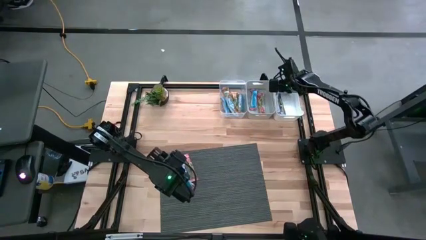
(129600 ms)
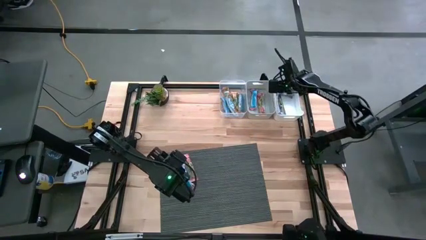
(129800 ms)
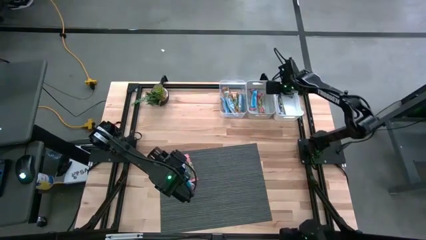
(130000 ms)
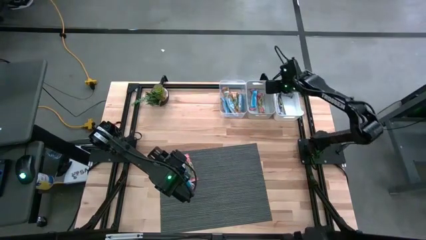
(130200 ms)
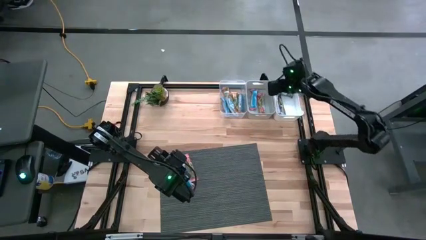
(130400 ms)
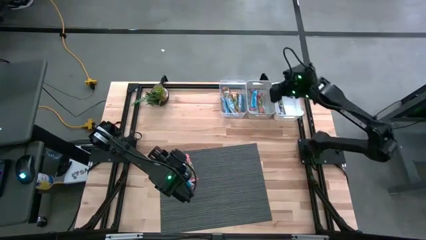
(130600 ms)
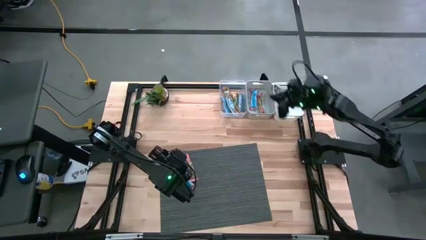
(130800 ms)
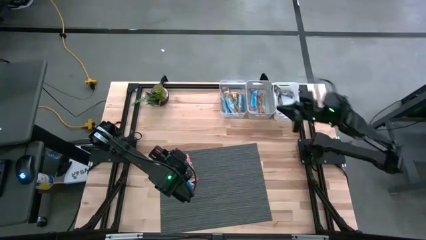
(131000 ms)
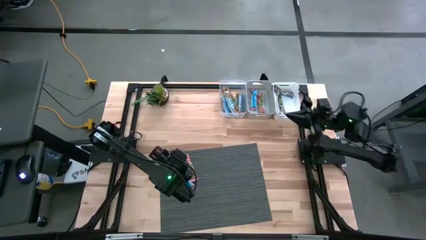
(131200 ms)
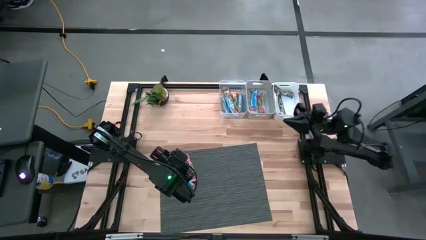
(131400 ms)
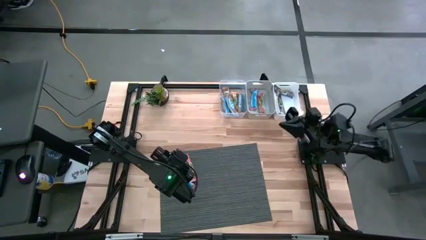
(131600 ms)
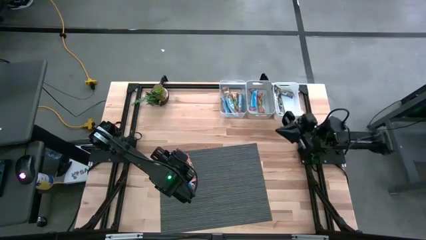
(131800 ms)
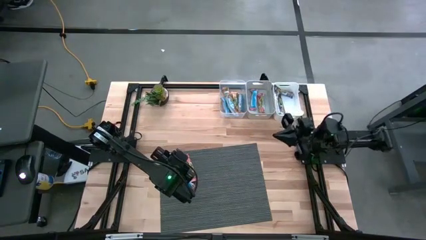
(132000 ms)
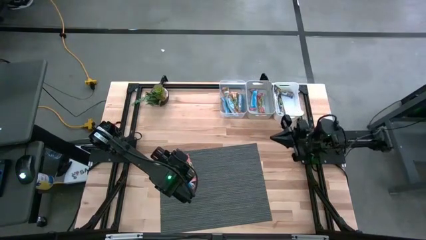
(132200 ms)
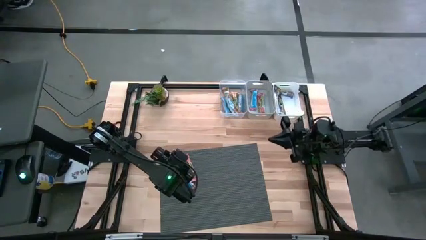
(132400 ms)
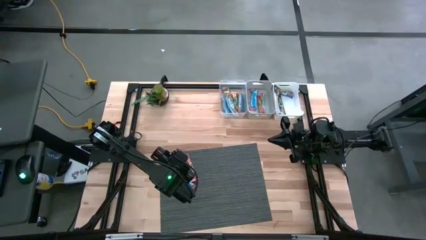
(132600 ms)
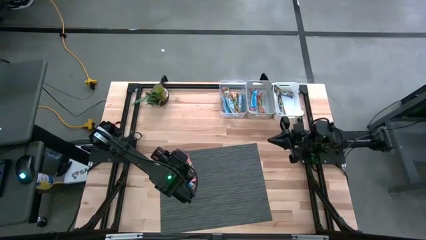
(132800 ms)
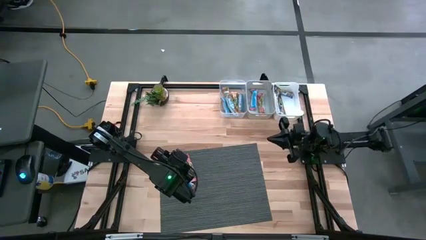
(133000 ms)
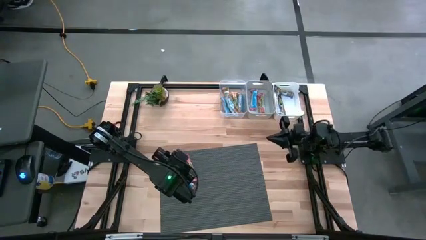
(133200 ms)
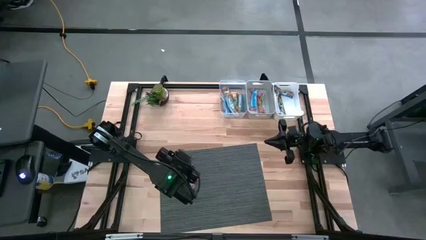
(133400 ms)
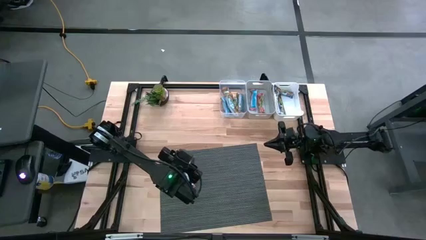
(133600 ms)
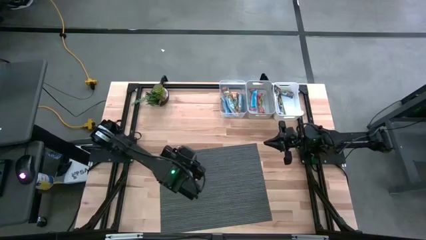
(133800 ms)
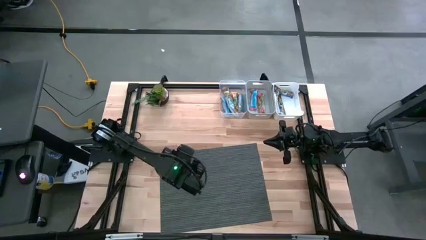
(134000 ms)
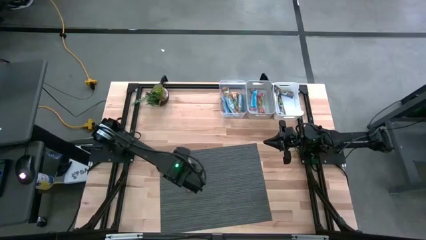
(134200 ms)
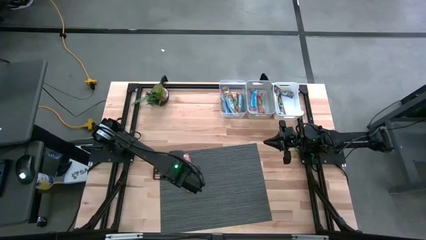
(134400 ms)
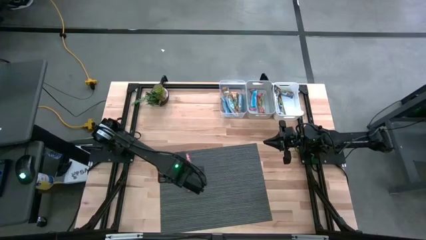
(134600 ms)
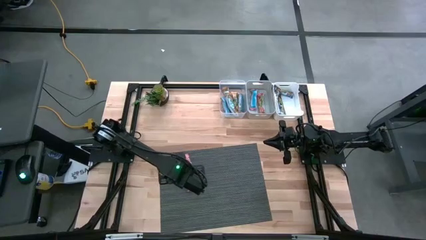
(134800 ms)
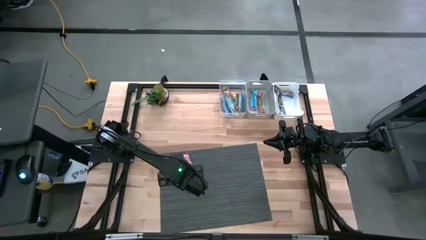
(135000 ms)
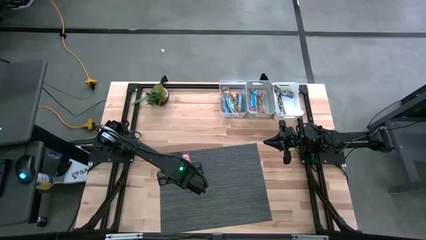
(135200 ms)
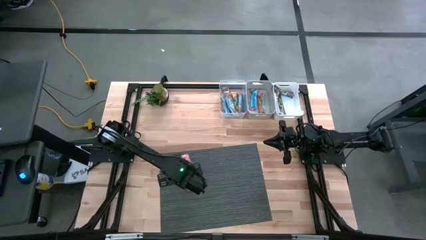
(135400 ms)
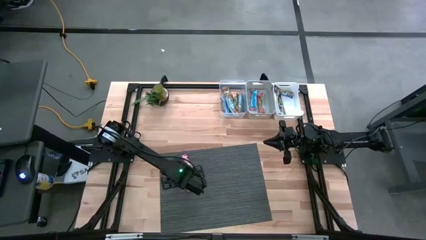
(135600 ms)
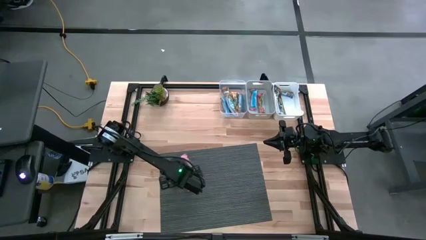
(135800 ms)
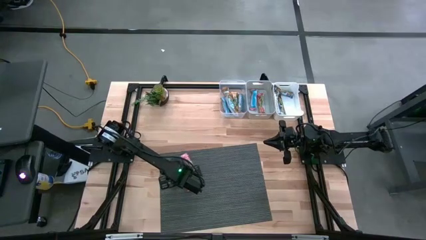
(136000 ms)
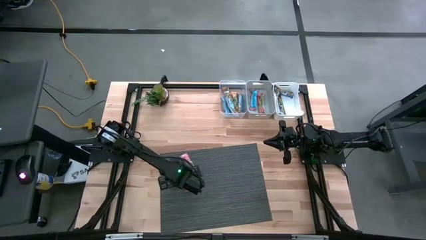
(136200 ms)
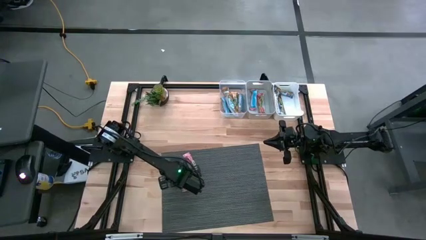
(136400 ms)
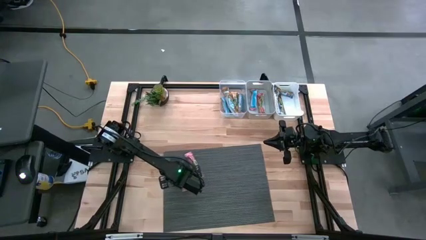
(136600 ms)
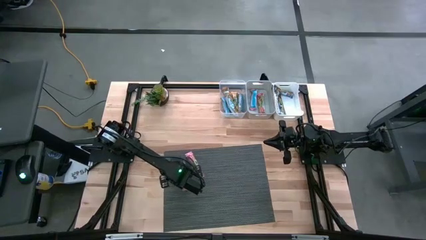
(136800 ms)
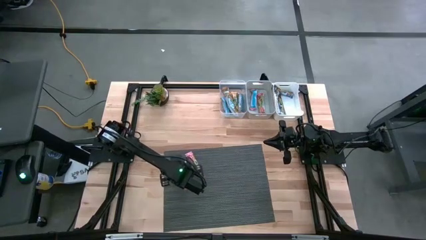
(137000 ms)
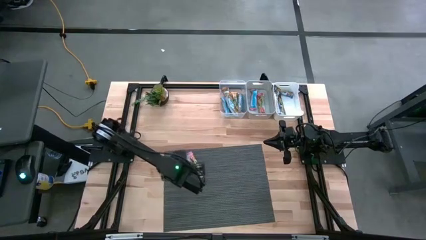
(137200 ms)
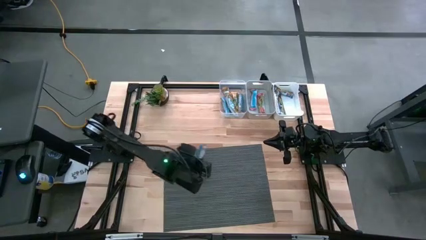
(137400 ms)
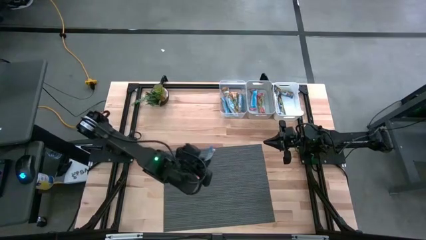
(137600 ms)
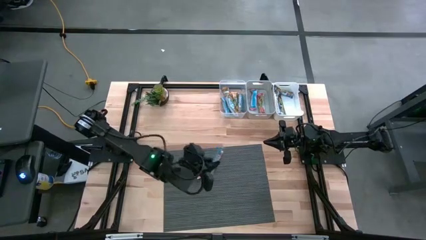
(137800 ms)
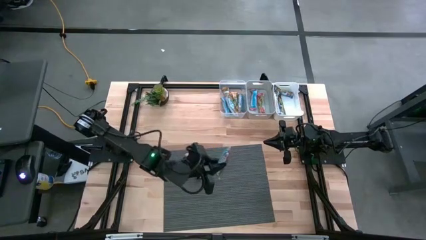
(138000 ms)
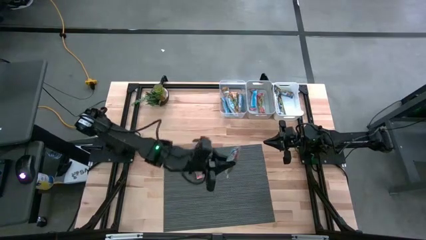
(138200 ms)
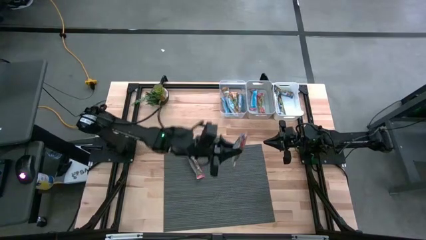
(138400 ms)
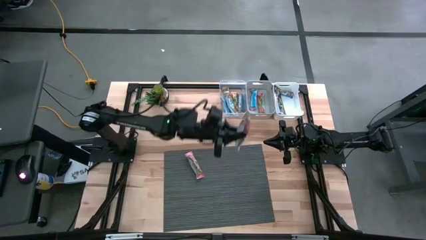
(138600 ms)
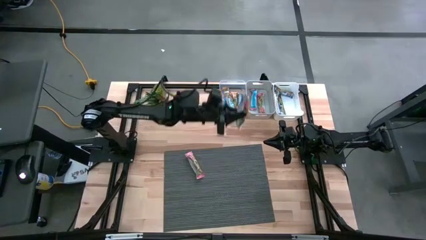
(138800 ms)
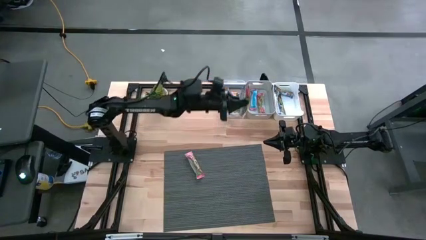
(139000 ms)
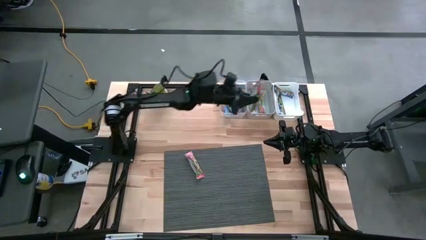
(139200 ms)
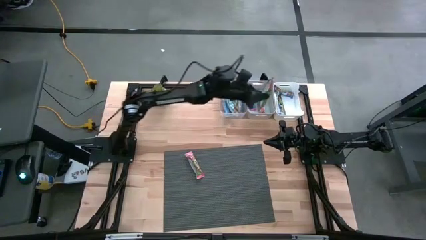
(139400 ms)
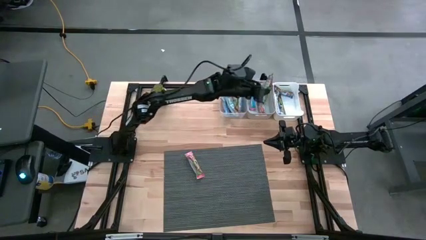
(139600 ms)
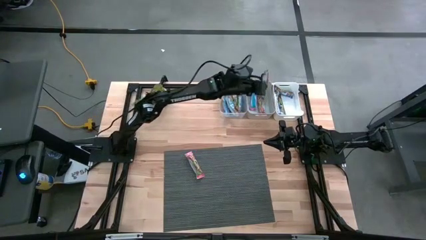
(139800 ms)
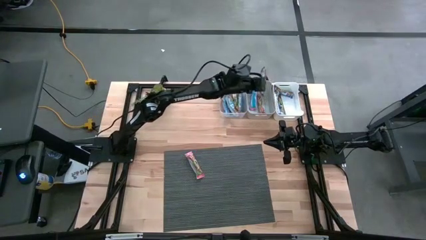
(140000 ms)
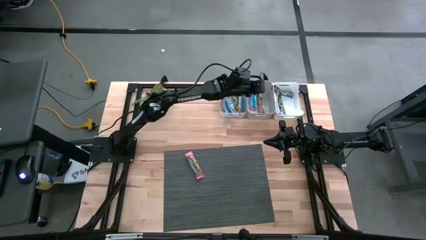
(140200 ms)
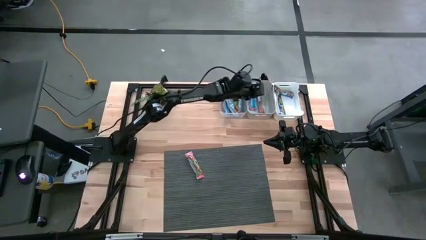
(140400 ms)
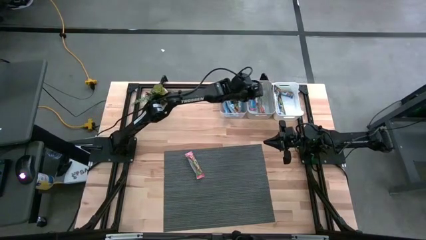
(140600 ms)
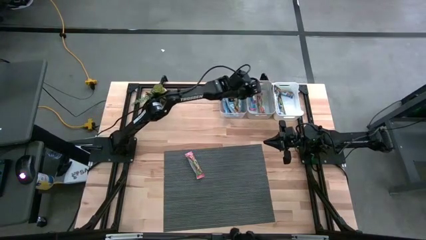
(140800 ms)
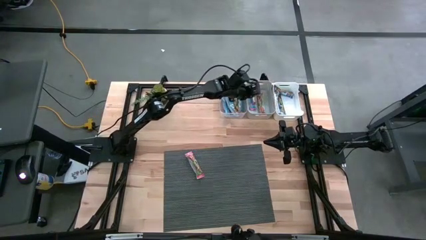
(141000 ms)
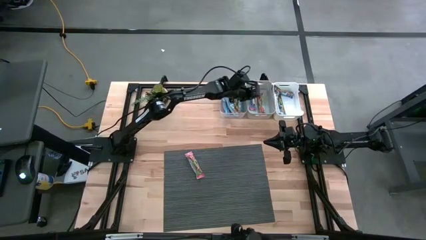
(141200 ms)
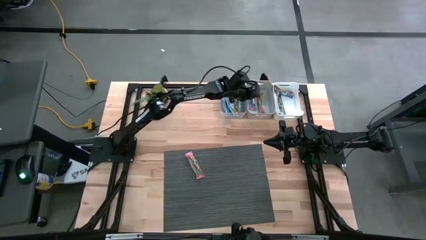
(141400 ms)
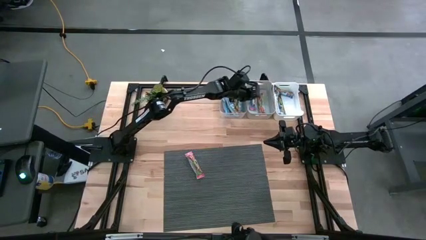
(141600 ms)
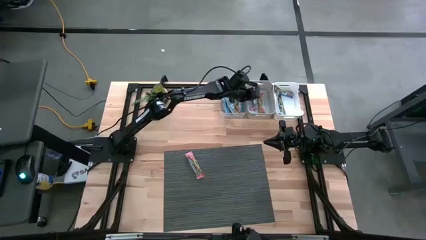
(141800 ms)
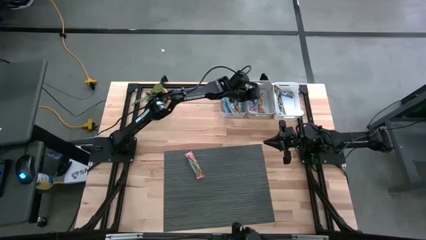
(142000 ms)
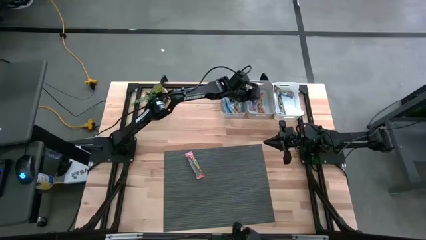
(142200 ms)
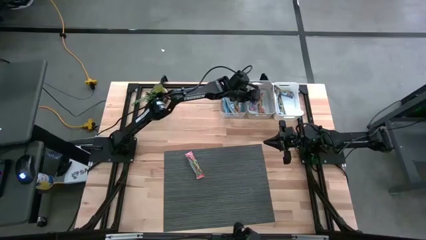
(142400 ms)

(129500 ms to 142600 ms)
Task: Pick and place Granola Bars by type
Put the red granola bar into the gray bin

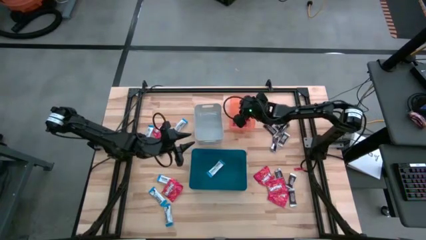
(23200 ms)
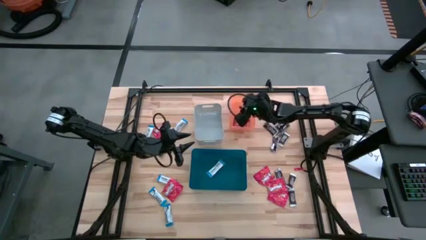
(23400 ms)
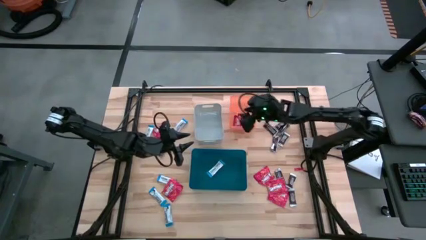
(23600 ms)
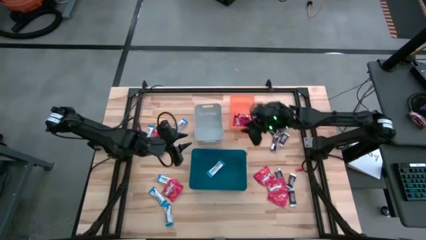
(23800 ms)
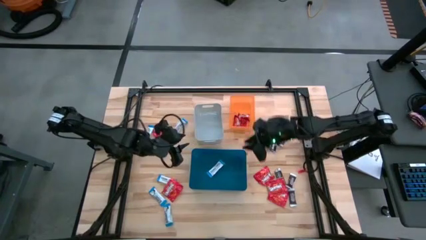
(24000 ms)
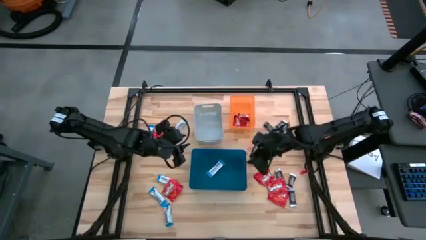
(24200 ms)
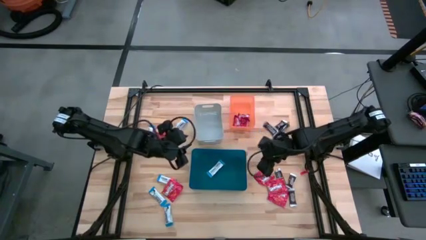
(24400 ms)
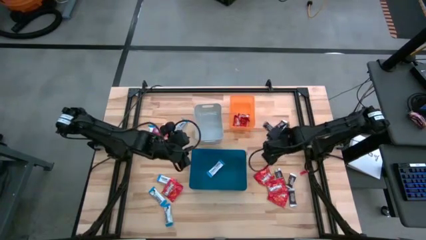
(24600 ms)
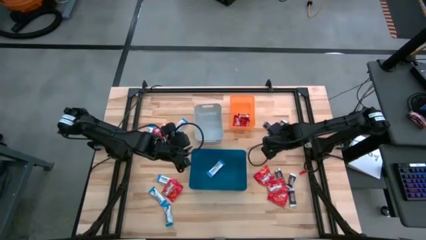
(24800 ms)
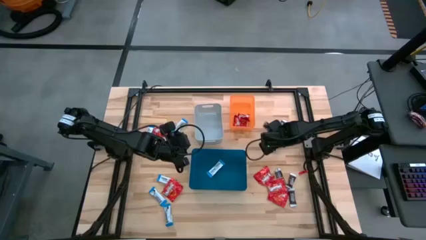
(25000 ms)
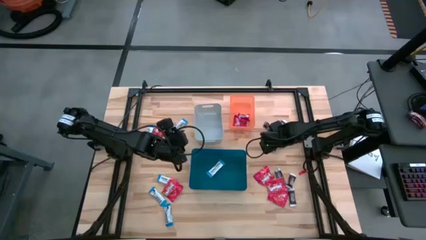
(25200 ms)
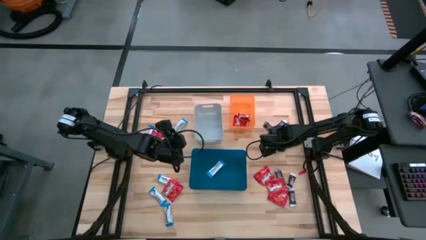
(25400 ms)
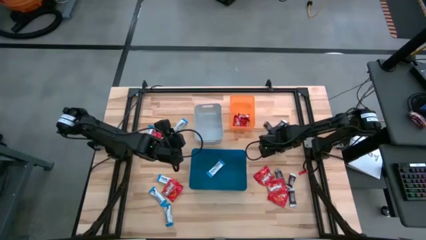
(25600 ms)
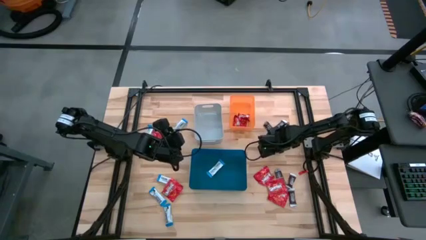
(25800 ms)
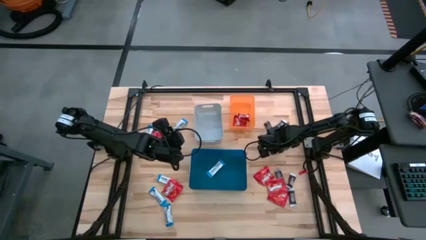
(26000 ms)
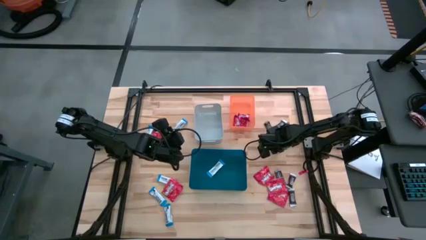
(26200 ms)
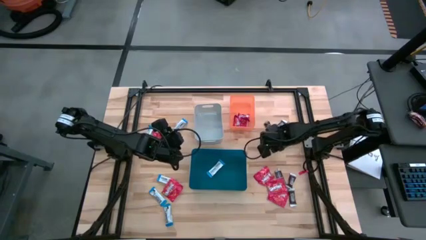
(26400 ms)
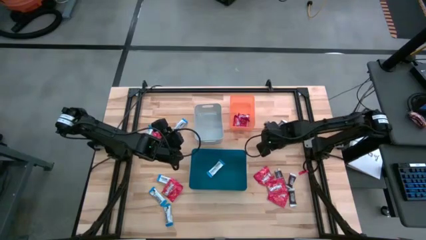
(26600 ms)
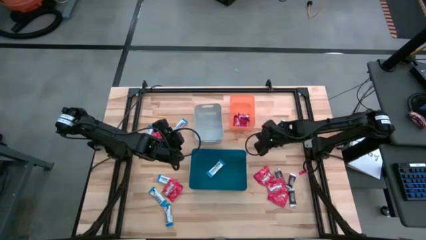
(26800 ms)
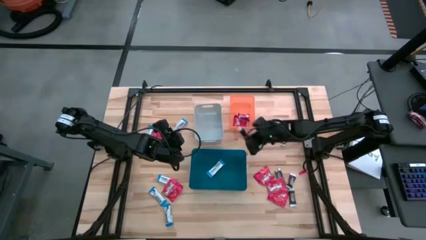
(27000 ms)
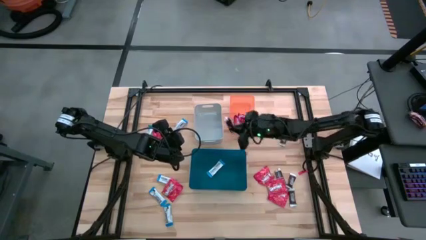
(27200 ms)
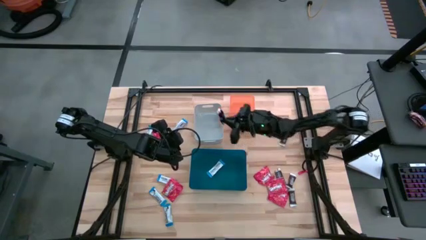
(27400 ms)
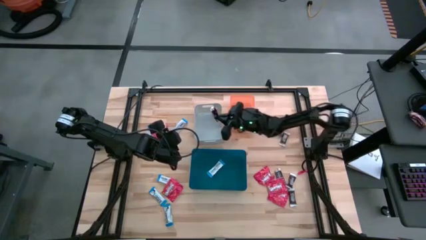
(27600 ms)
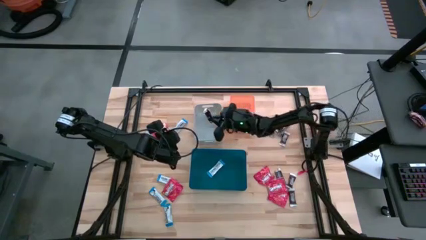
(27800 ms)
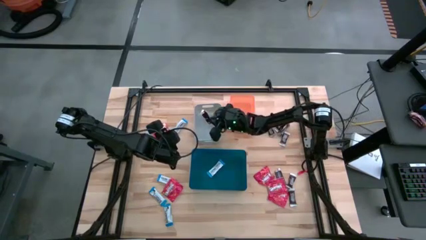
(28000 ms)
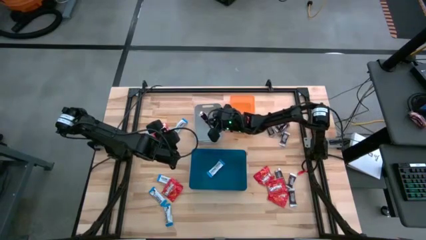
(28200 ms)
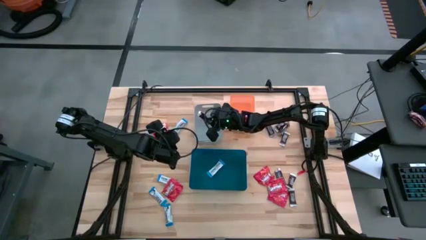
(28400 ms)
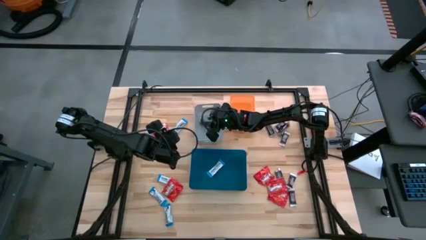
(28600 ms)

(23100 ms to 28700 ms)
Task: Sort candy
Put the brown chocolate bar into the gray bin
